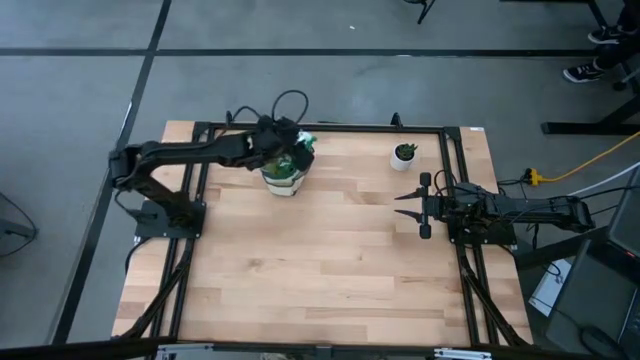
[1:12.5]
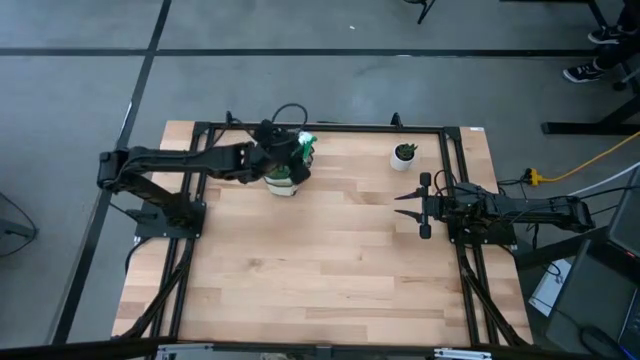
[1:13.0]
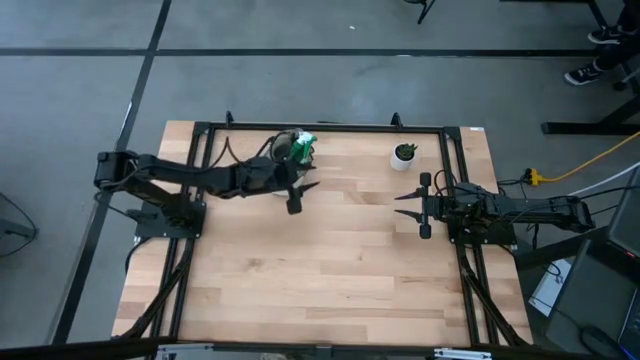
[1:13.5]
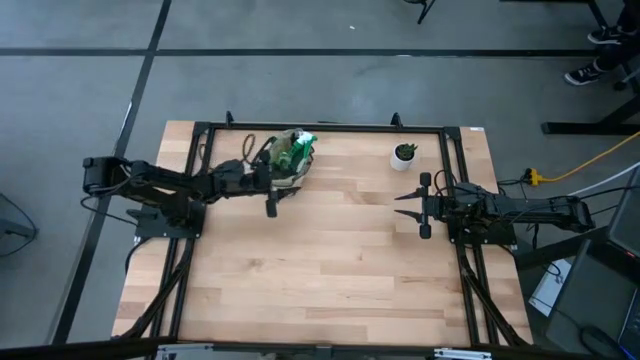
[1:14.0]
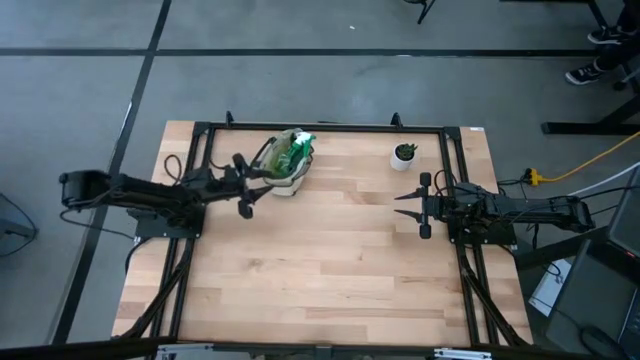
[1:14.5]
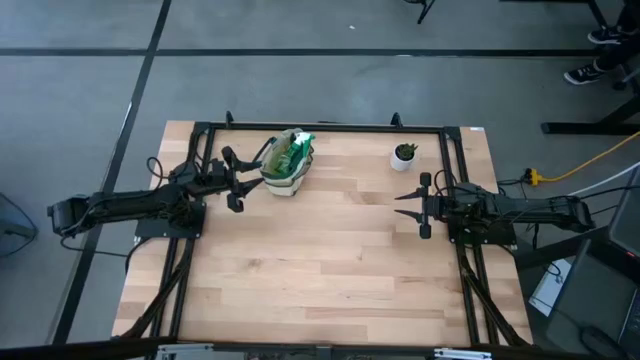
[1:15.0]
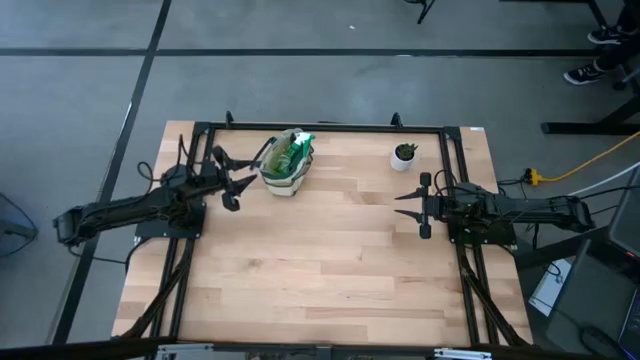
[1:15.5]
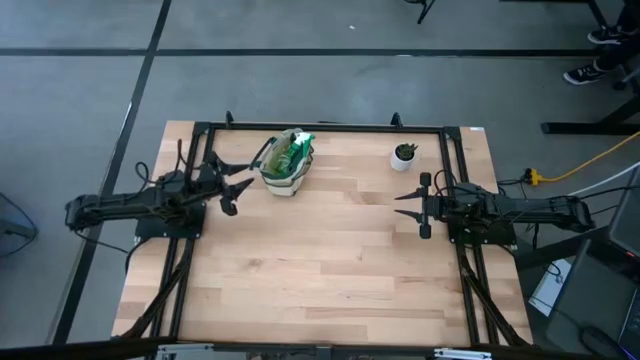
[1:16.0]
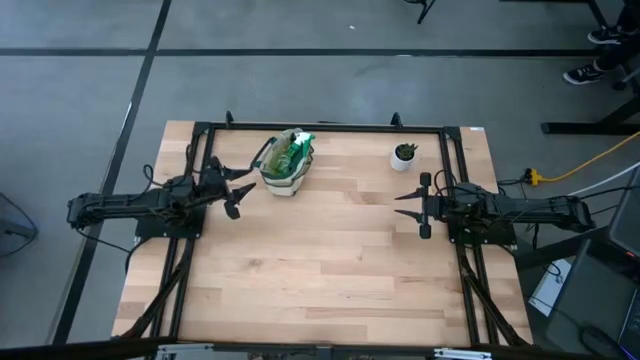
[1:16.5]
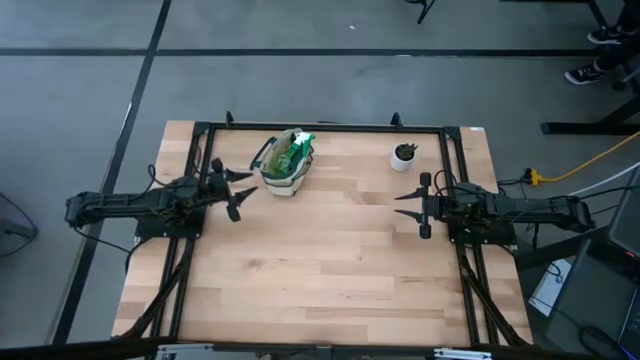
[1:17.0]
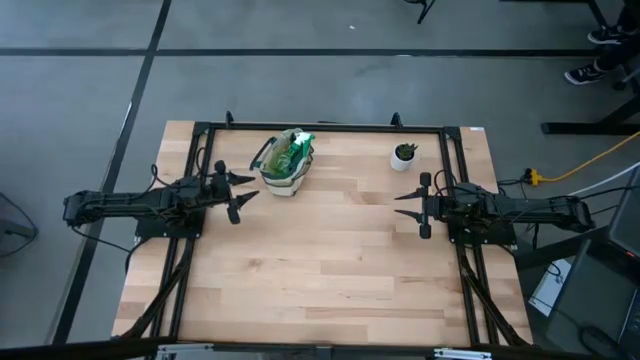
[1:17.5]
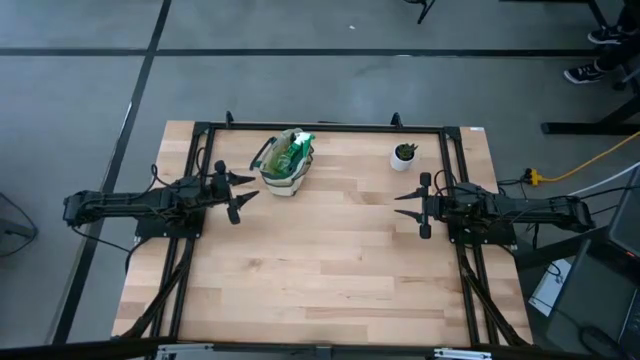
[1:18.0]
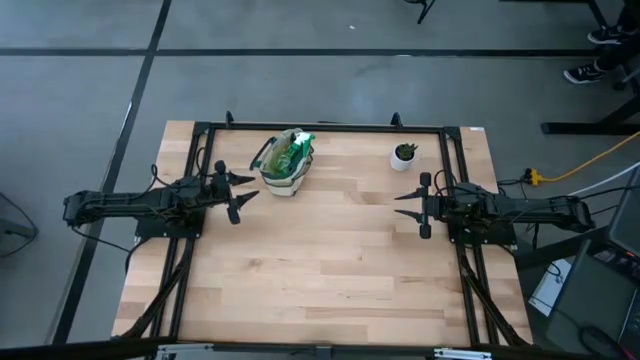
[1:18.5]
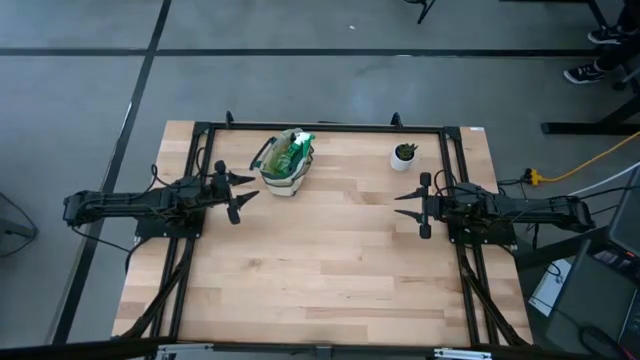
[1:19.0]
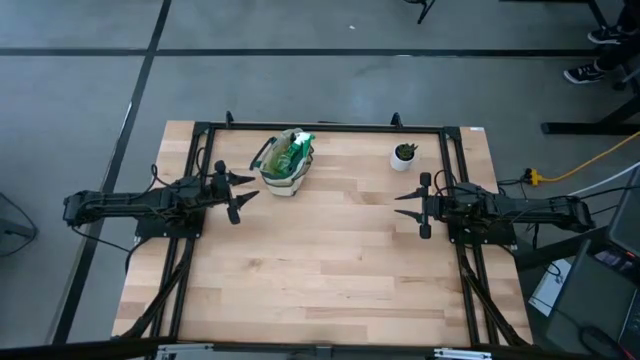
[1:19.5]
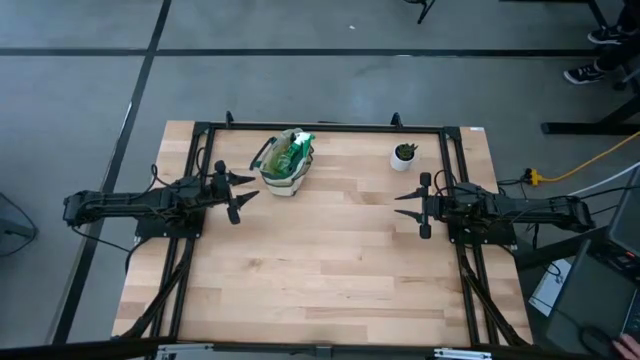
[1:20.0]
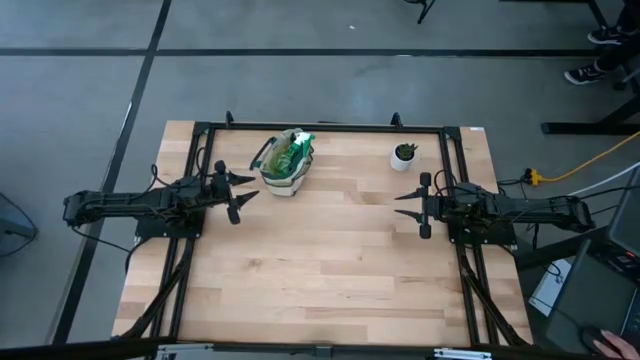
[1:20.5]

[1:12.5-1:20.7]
Task: Pick & Place Garden tools in Gardening bag
Return to Home Position

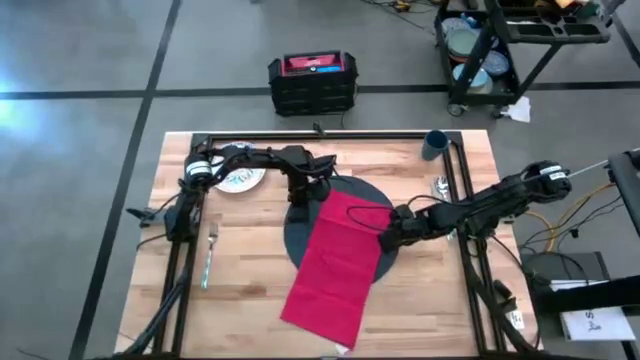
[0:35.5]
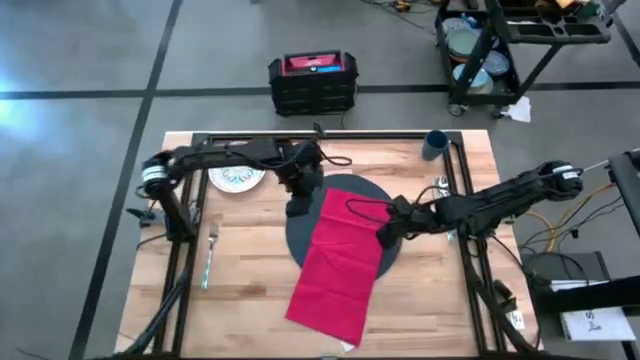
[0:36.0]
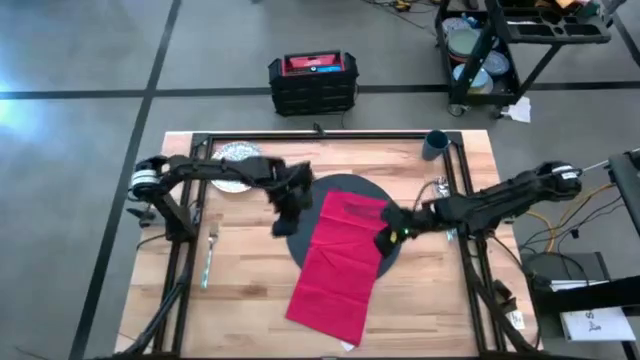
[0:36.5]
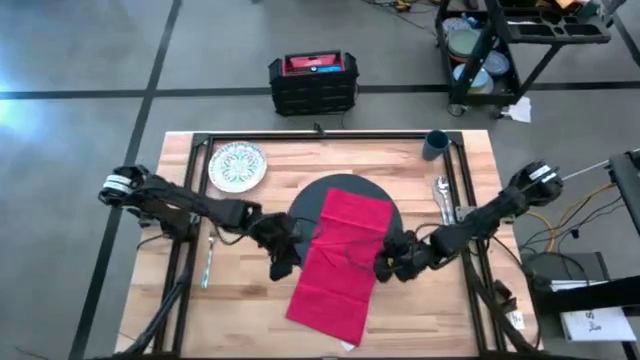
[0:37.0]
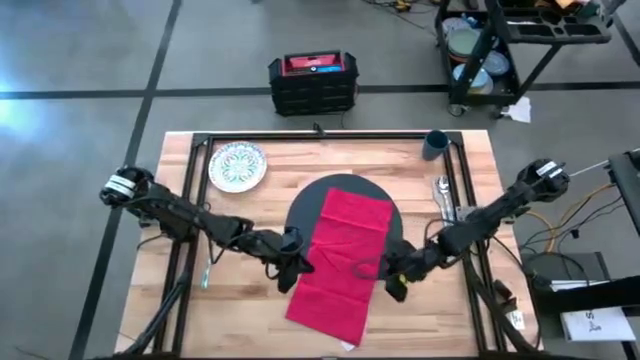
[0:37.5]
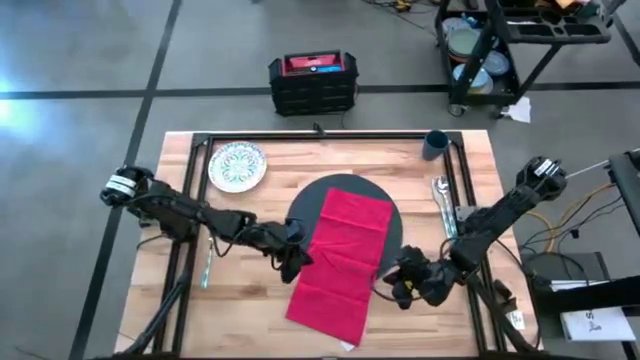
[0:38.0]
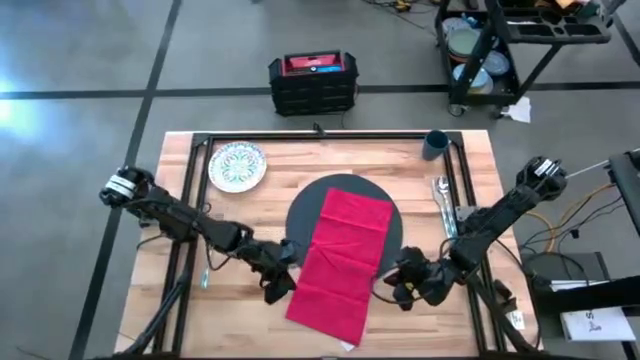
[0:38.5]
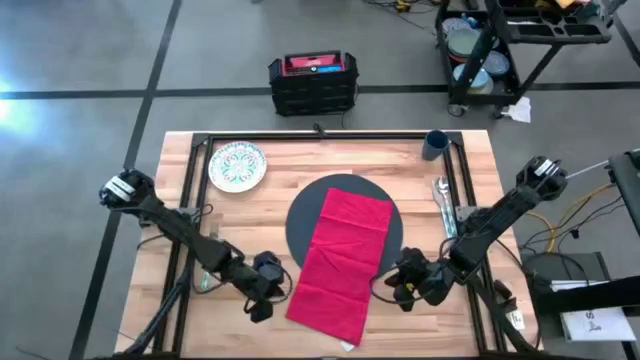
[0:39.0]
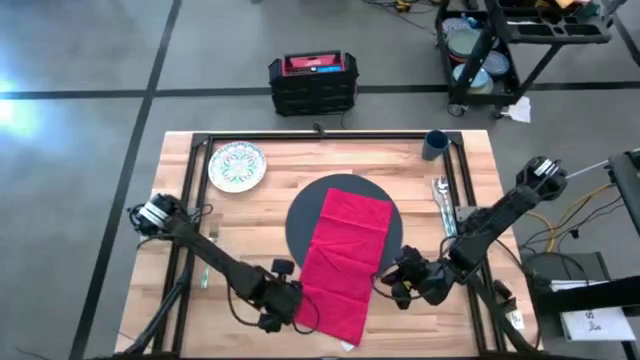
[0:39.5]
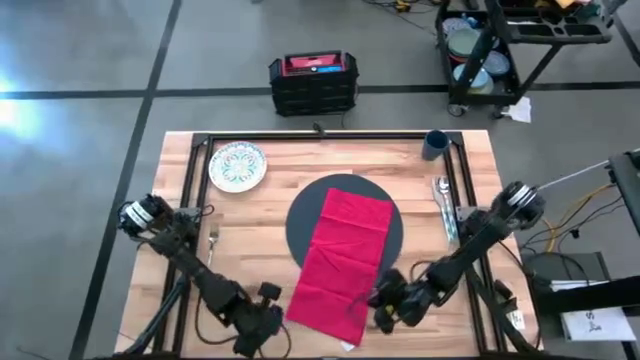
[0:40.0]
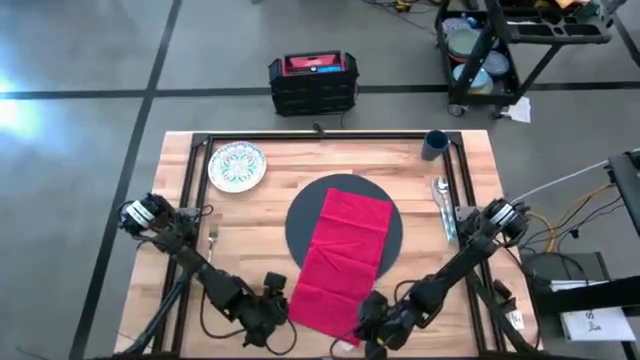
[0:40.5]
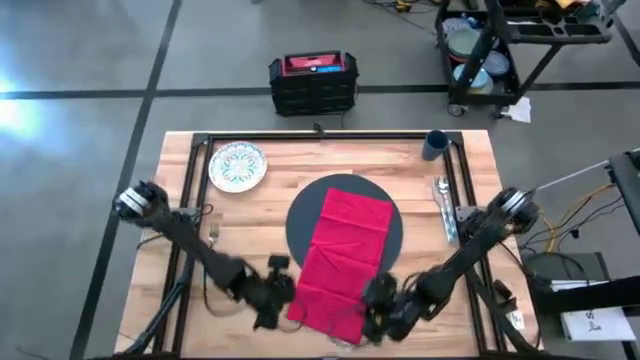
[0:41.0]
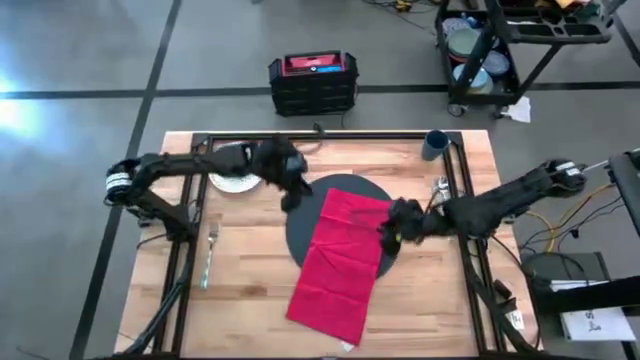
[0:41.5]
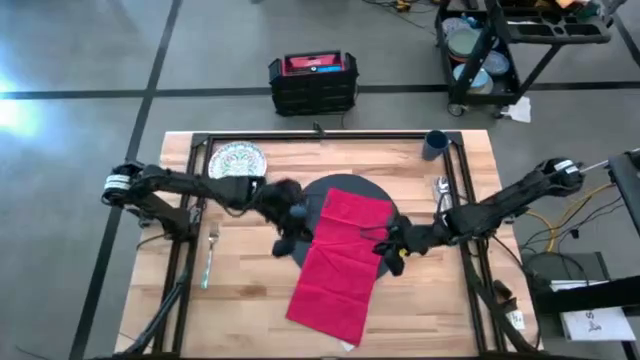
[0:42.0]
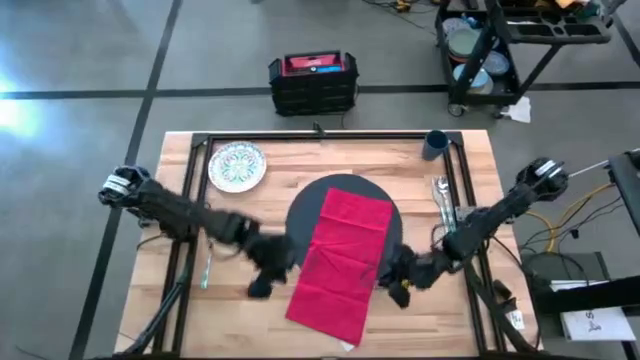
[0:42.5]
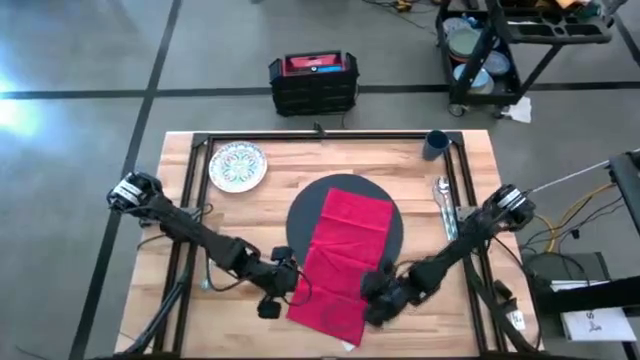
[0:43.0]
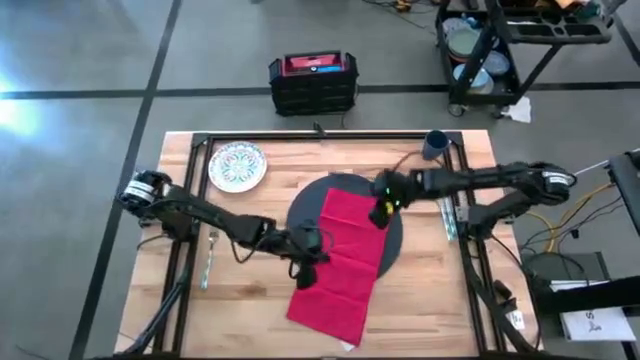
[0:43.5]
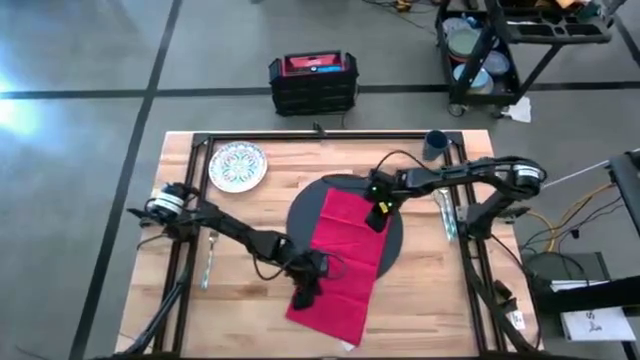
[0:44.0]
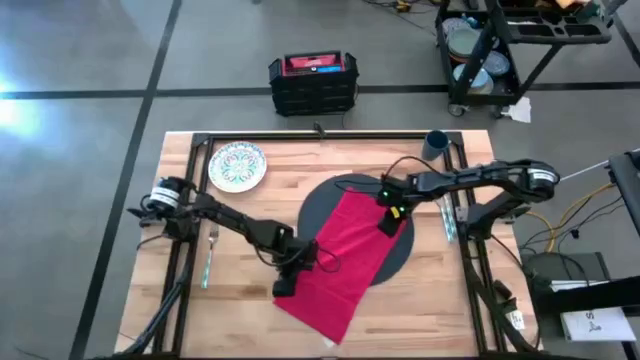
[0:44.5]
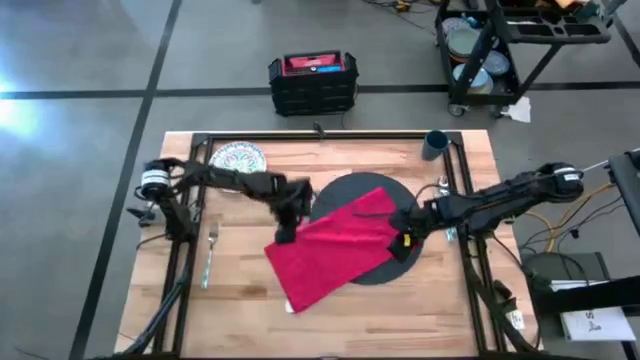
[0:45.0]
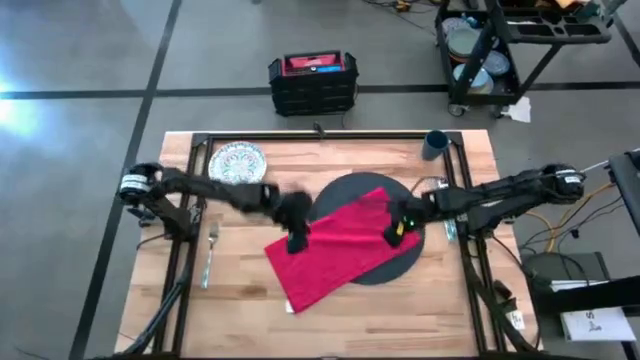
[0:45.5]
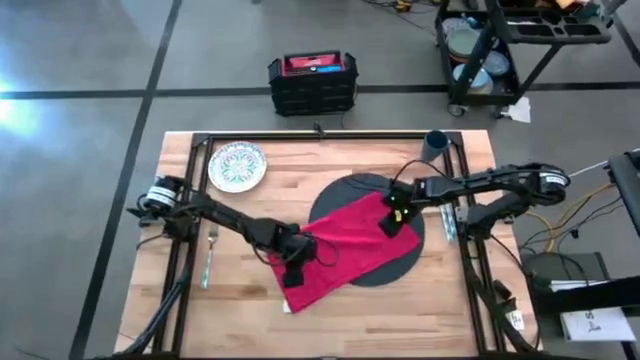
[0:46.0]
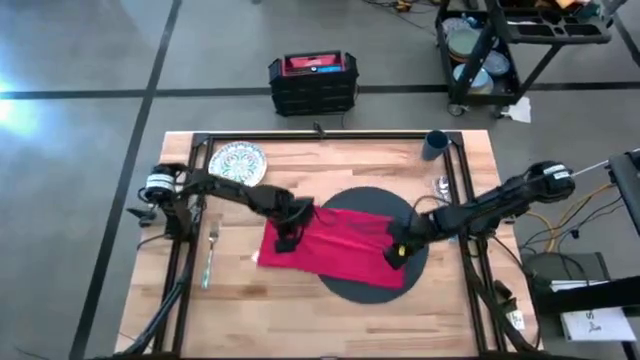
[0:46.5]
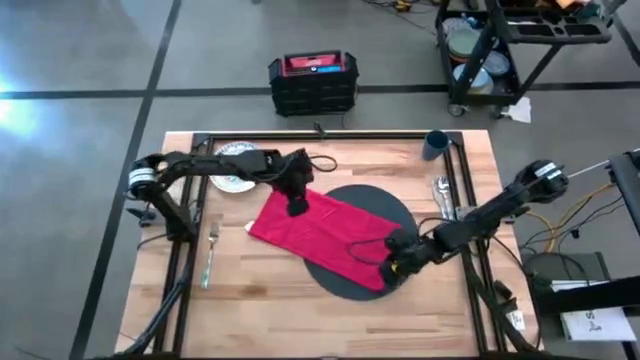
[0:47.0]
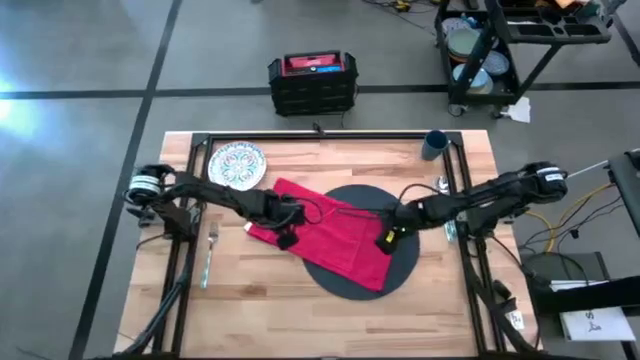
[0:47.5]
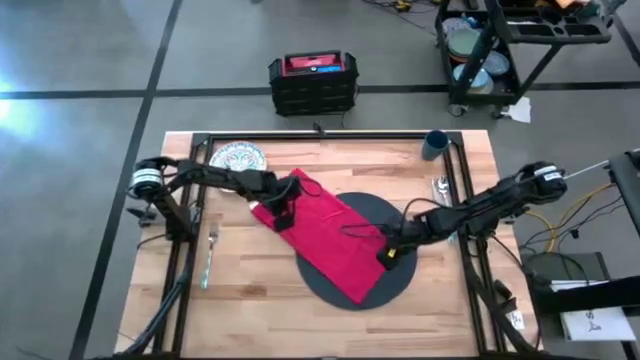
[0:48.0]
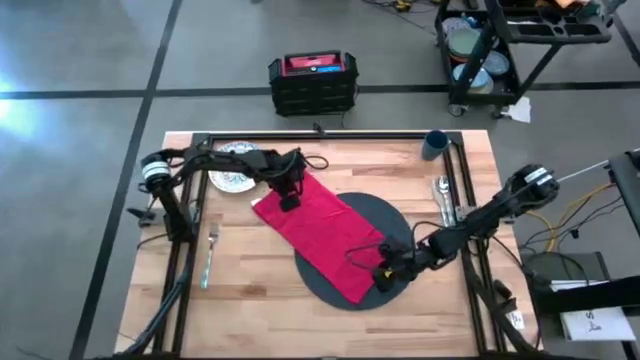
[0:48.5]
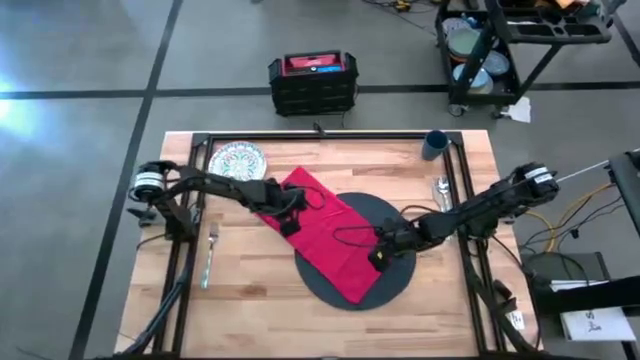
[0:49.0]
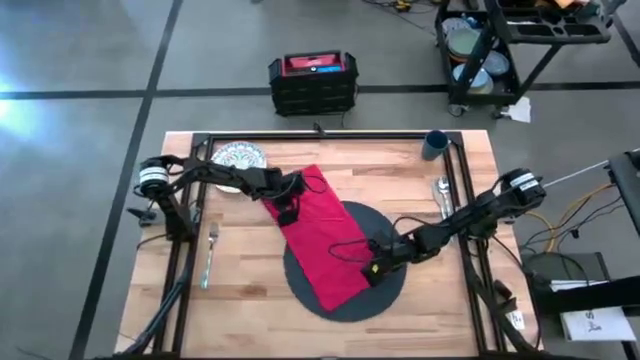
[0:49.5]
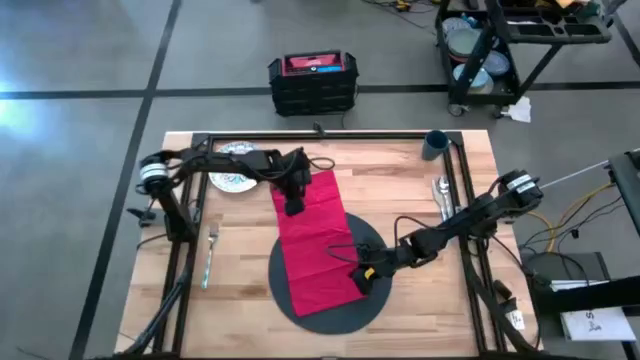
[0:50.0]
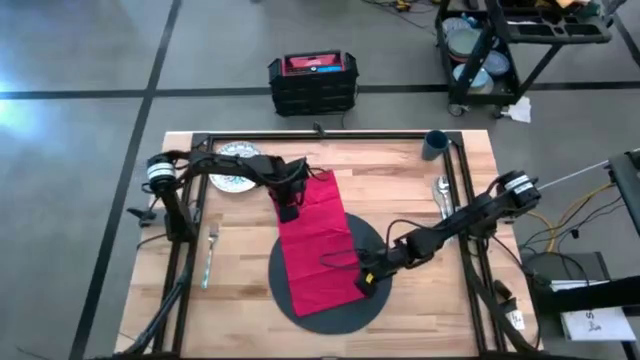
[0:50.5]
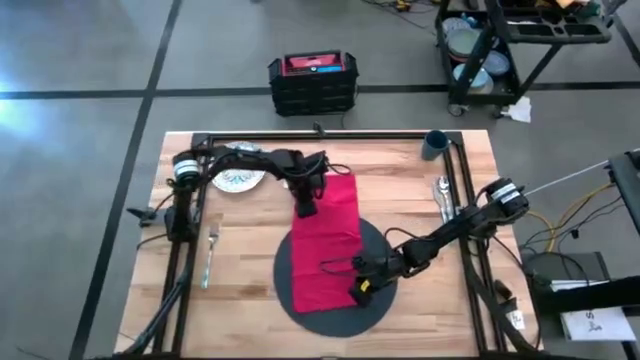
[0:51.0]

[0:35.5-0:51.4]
Task: Set table place
Adjust the black placemat
